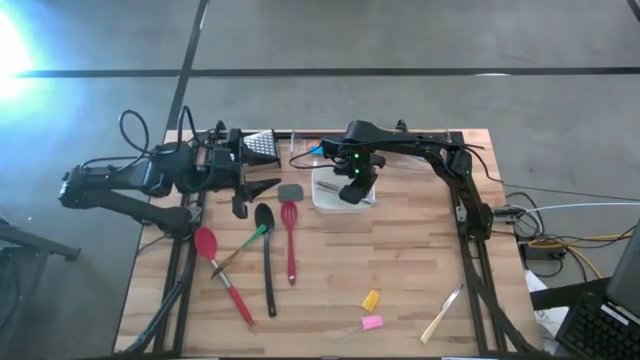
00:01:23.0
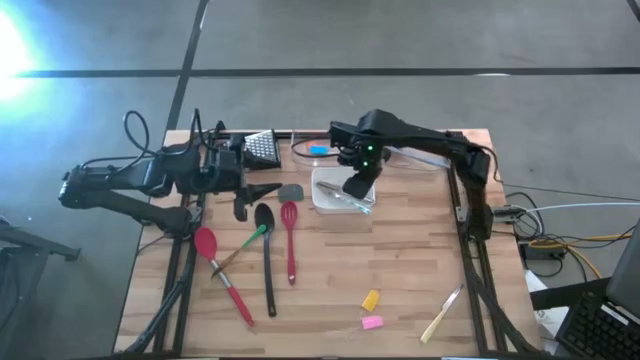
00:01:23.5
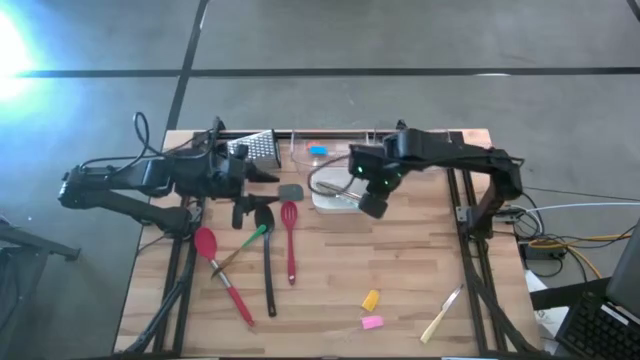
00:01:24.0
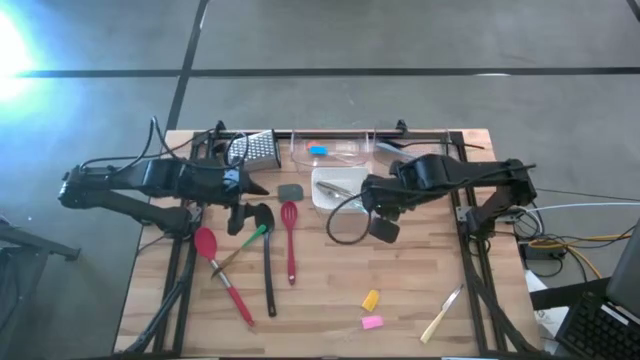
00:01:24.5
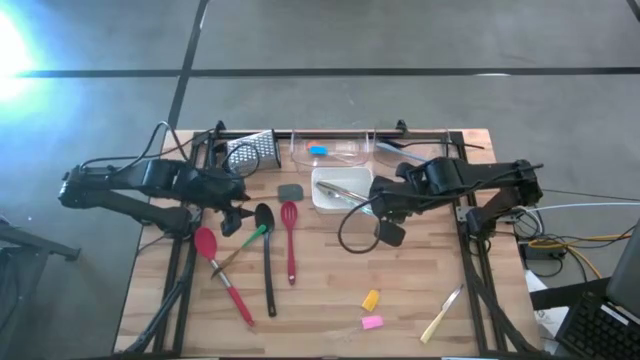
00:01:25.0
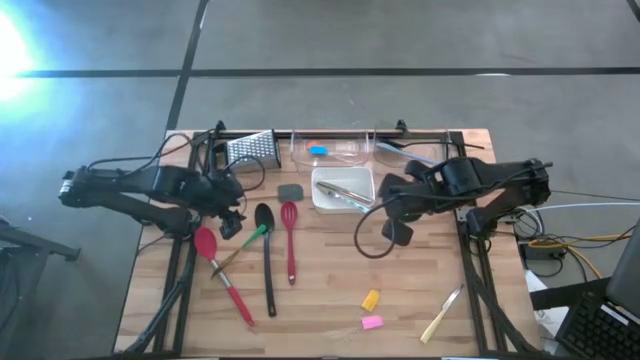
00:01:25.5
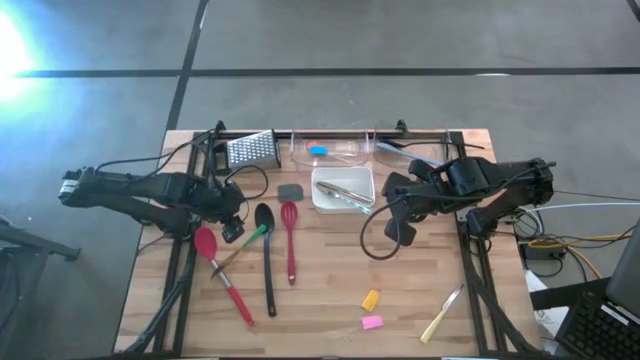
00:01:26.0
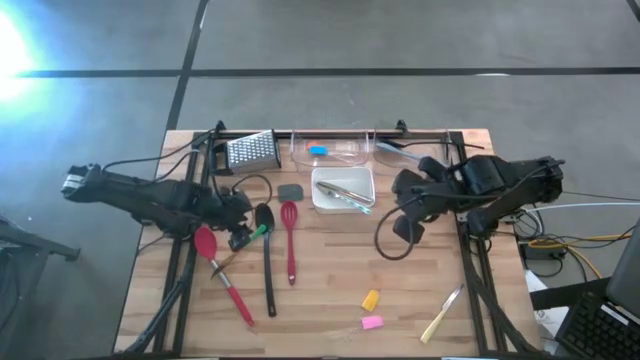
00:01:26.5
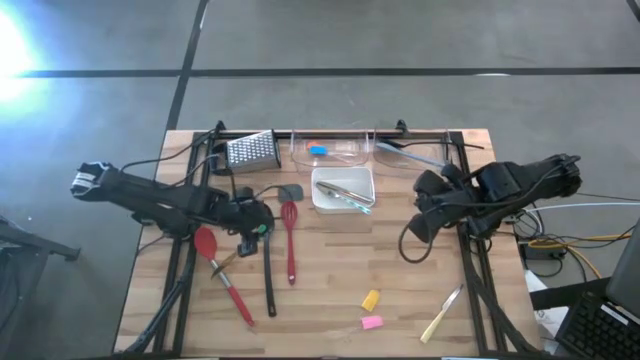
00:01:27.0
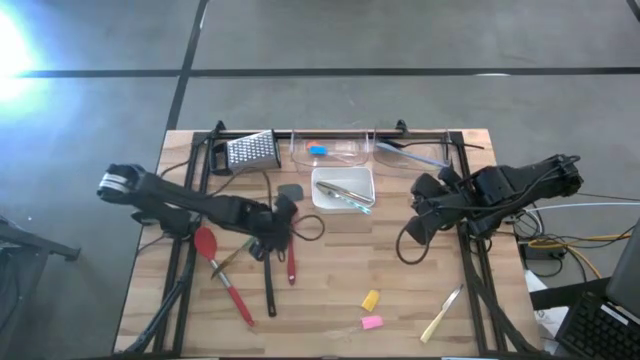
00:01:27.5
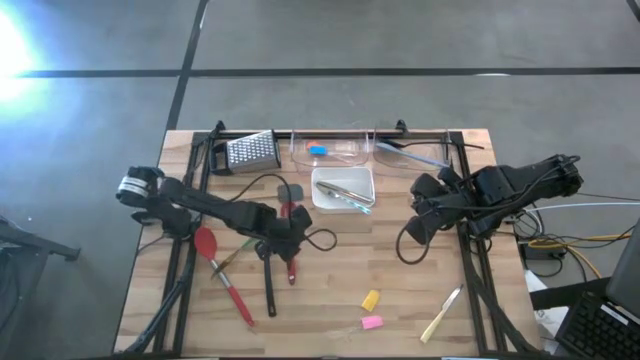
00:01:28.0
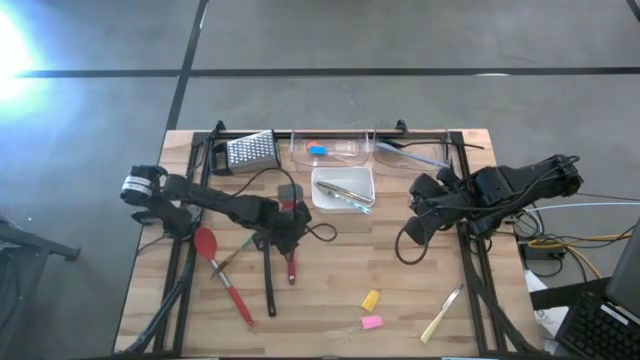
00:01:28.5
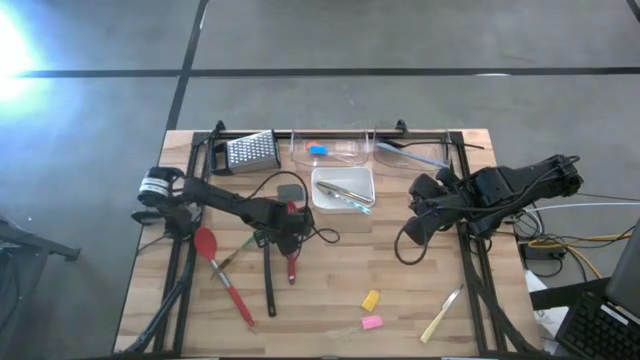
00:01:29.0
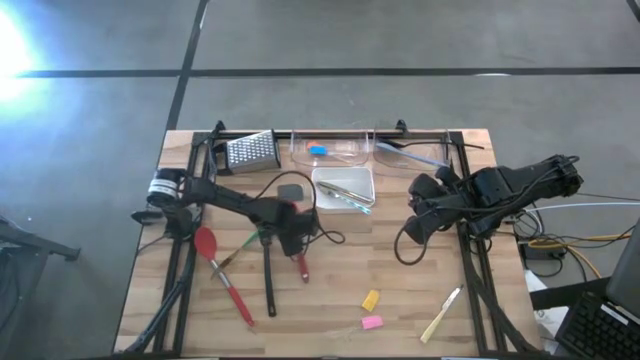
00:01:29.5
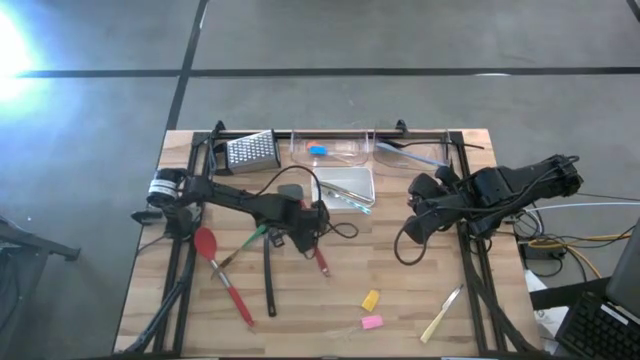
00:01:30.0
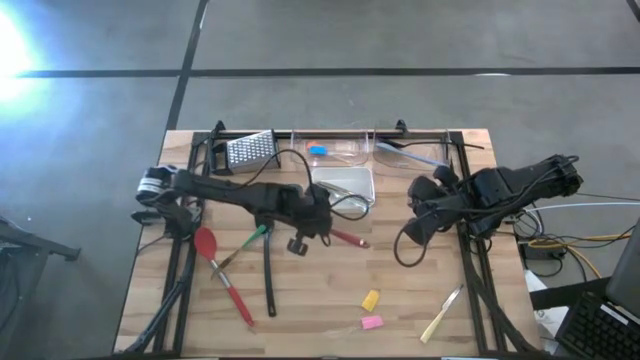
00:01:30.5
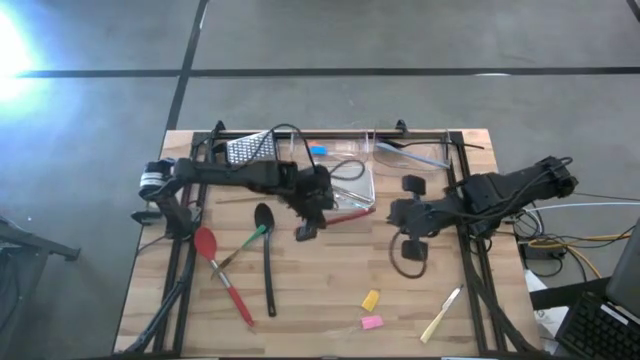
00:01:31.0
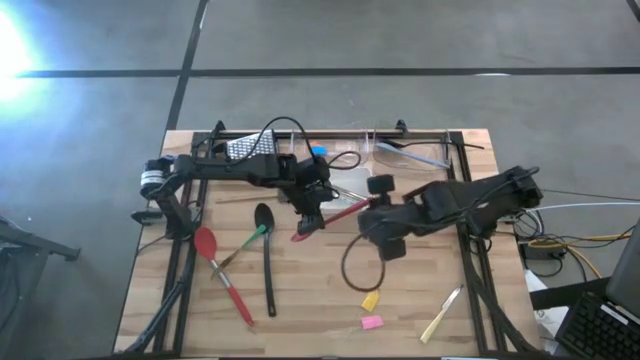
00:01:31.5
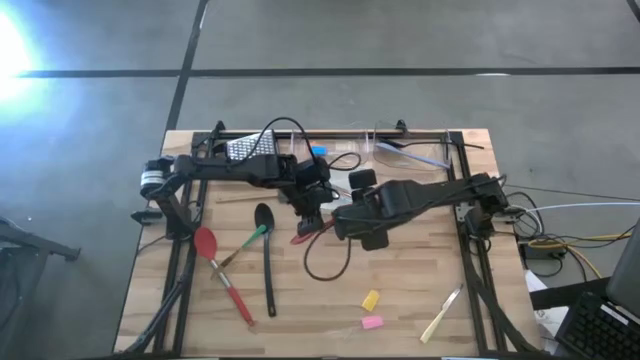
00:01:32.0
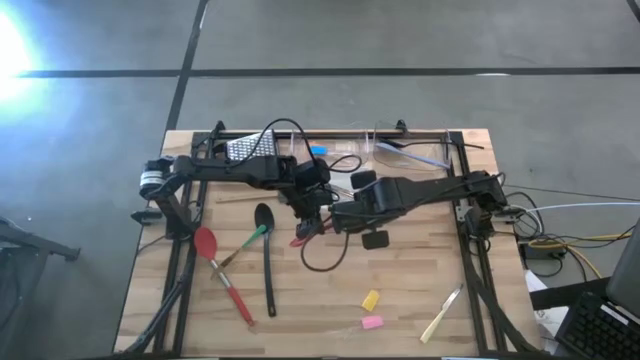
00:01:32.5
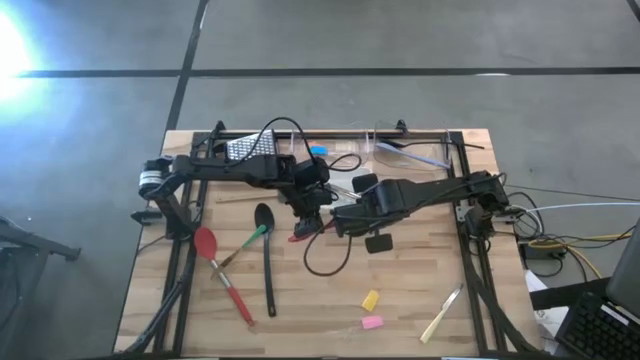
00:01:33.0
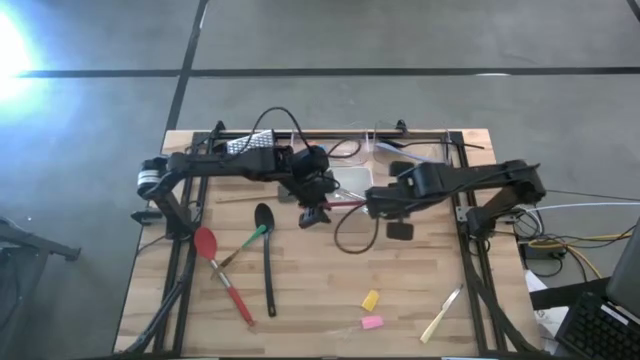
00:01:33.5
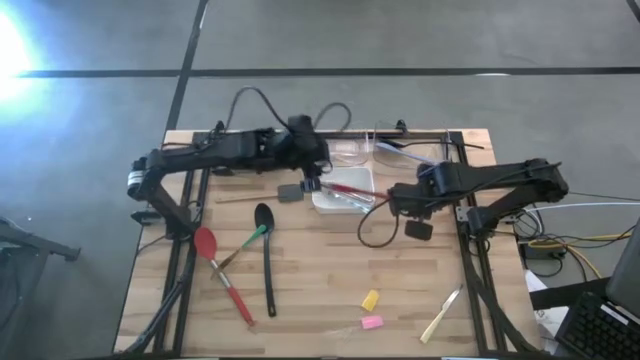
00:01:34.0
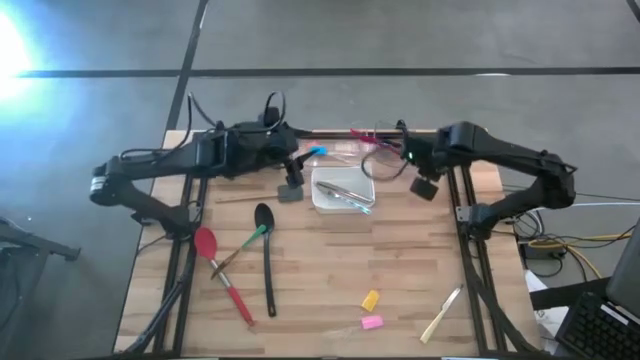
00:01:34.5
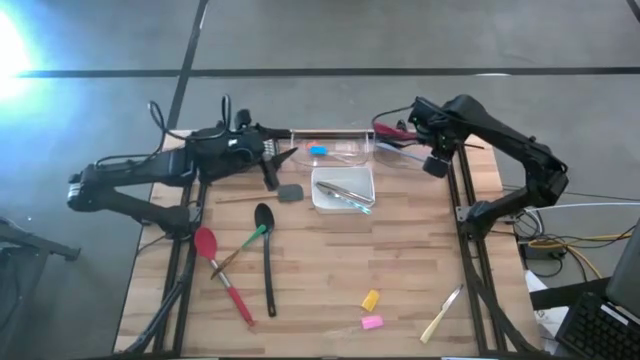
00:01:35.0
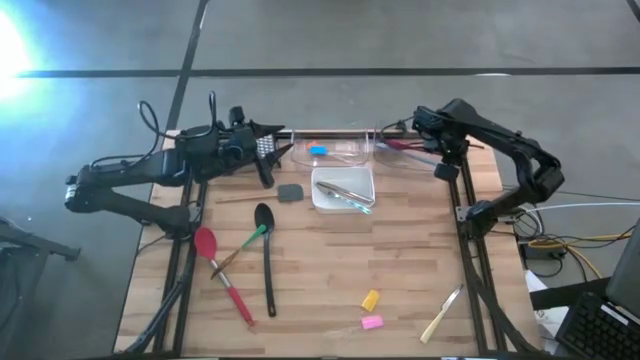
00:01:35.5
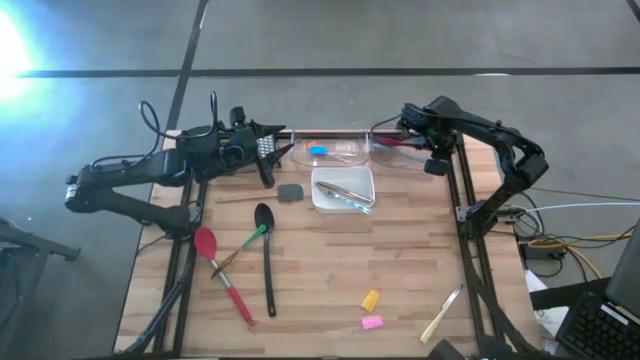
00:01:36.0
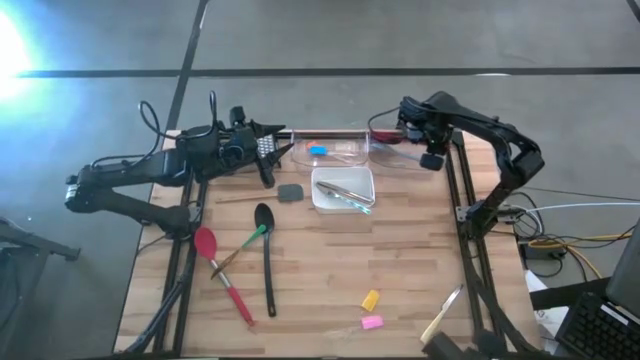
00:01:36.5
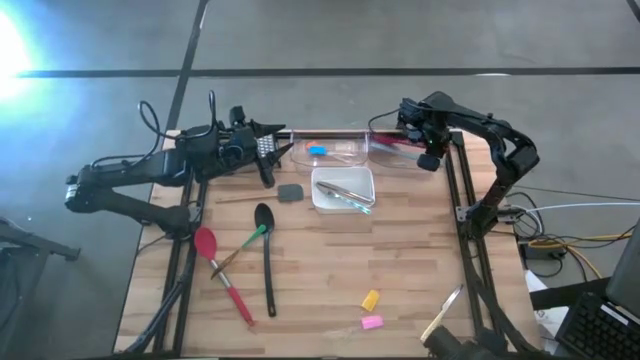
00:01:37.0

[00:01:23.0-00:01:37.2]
Task: Pick & Place Kitchen Items
Put the red serving spoon into right transparent bin

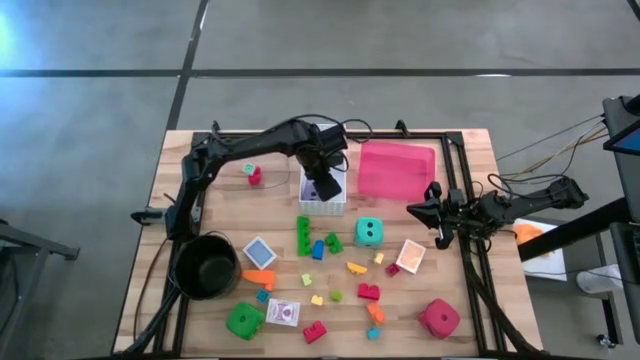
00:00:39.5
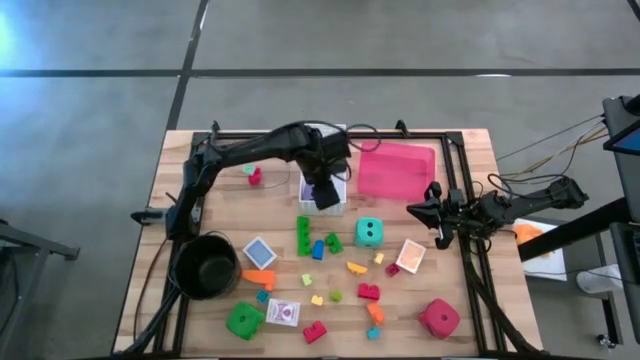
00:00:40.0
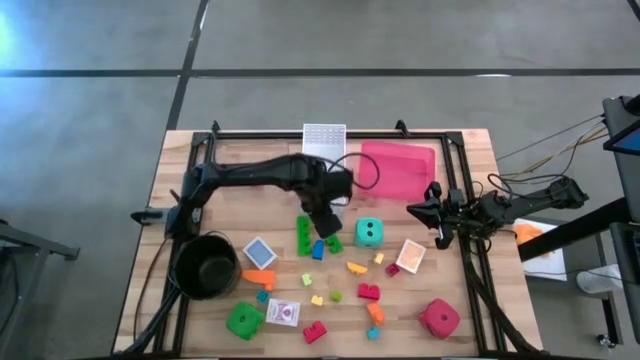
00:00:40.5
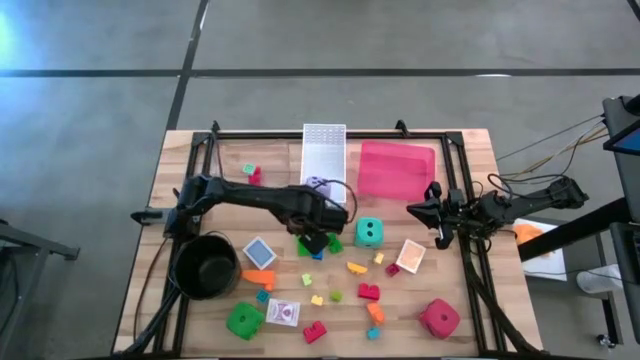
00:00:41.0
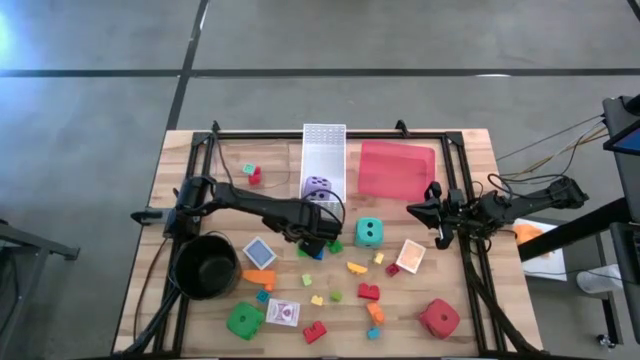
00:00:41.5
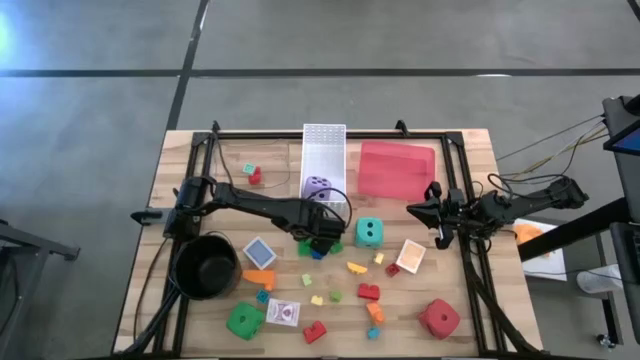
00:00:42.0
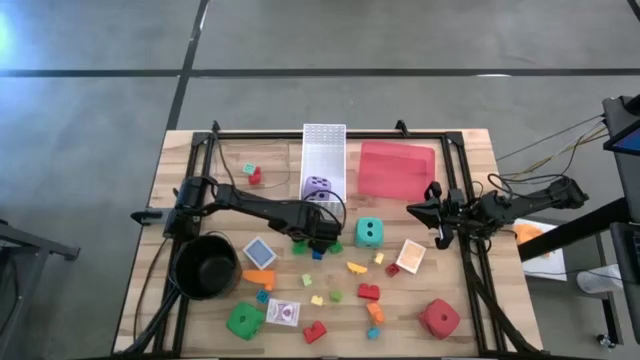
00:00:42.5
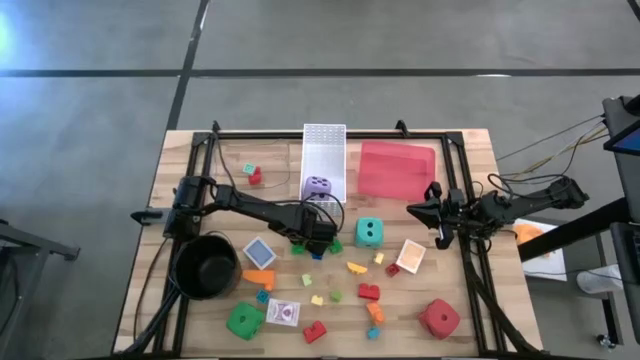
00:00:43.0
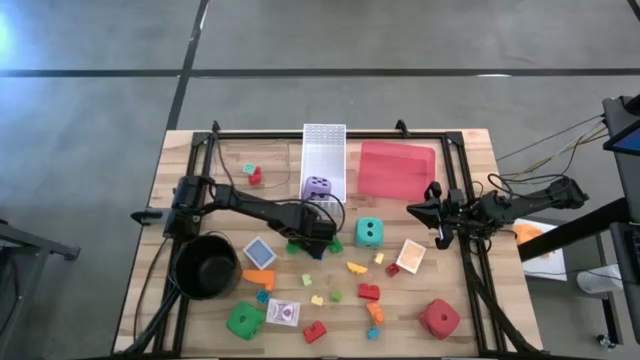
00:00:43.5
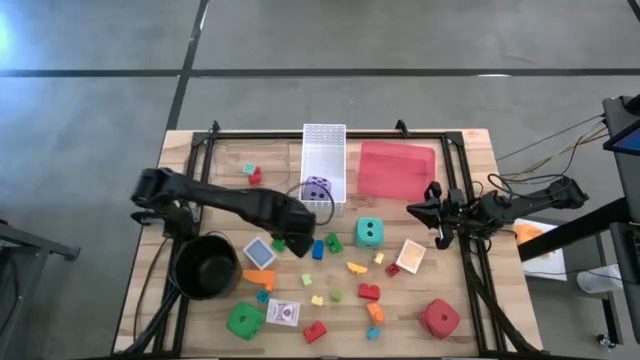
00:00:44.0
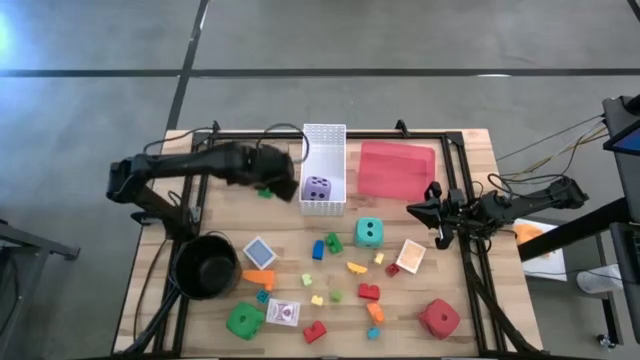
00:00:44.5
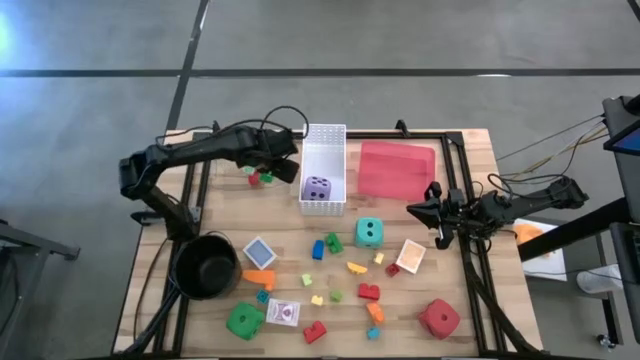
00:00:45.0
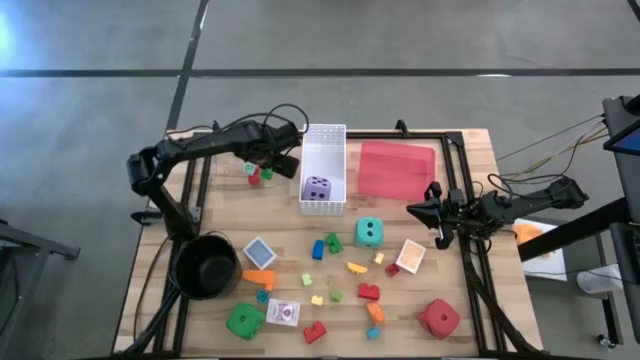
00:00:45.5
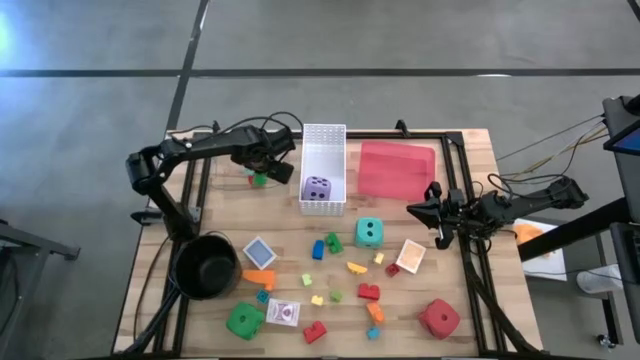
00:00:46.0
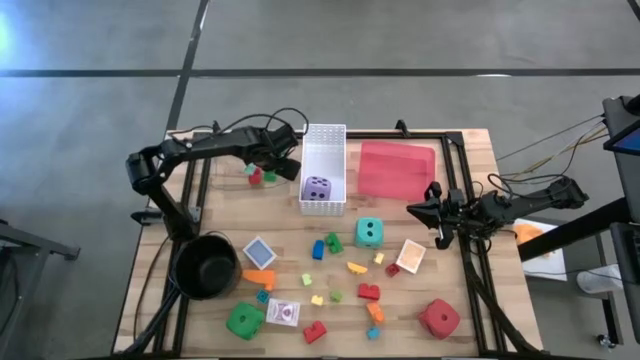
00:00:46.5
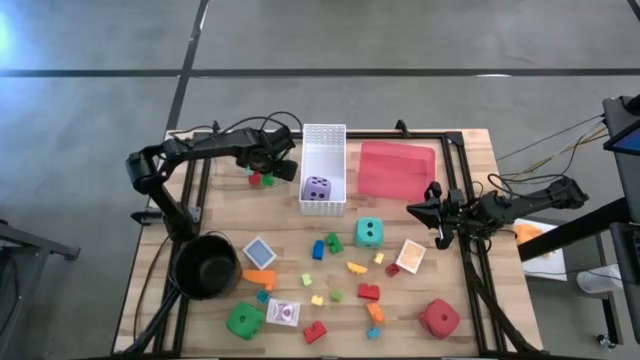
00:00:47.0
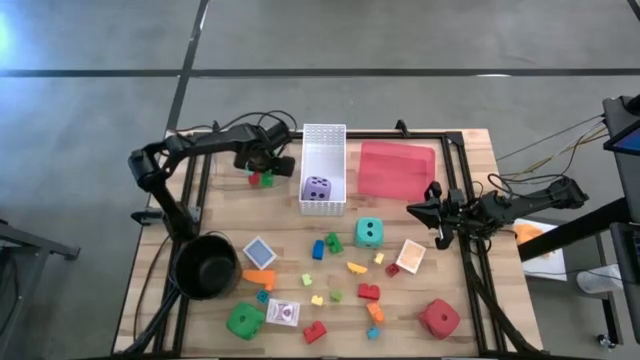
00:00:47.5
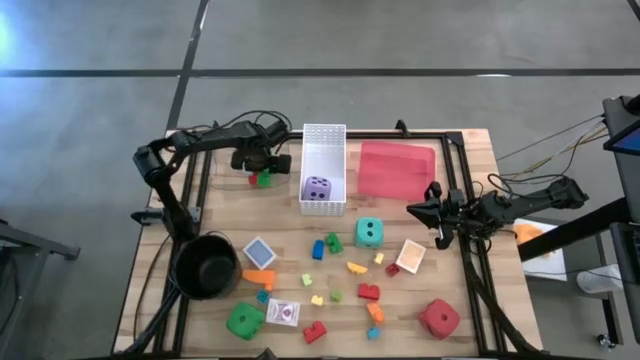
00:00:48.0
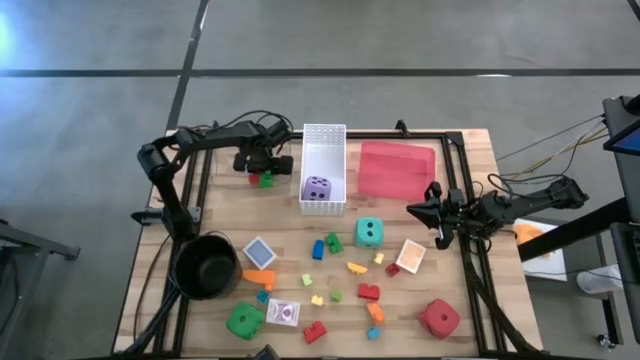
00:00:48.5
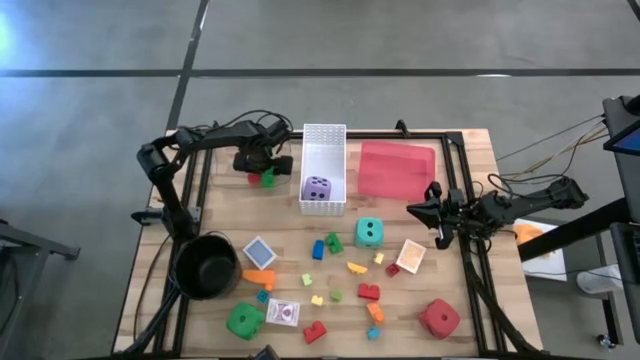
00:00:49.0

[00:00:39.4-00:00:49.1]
Task: Pick & Place Toys
Put the green game piece into the transparent bin
